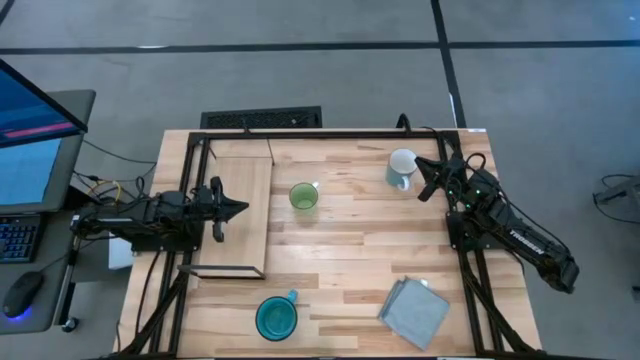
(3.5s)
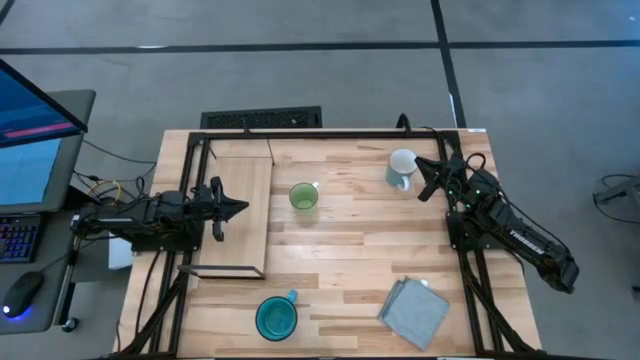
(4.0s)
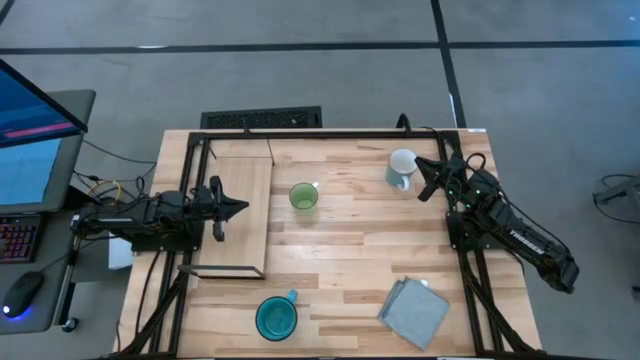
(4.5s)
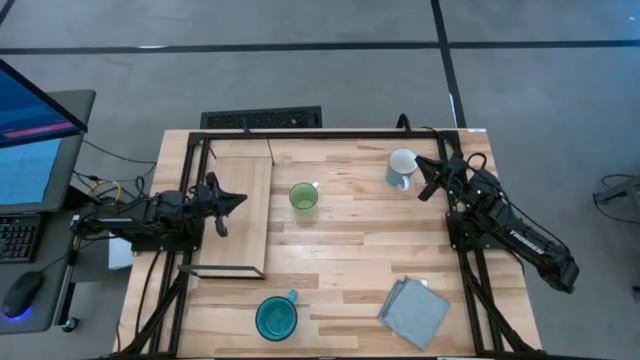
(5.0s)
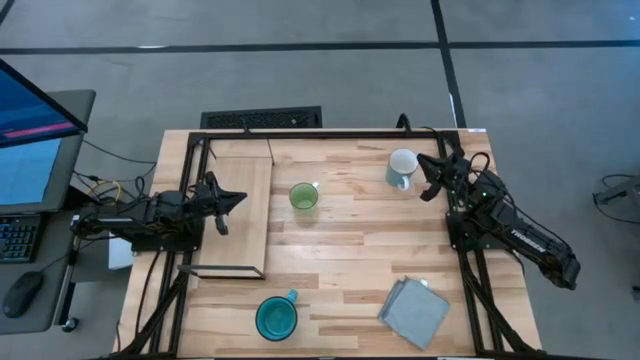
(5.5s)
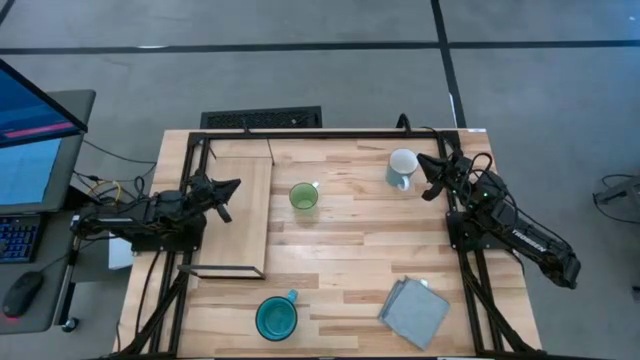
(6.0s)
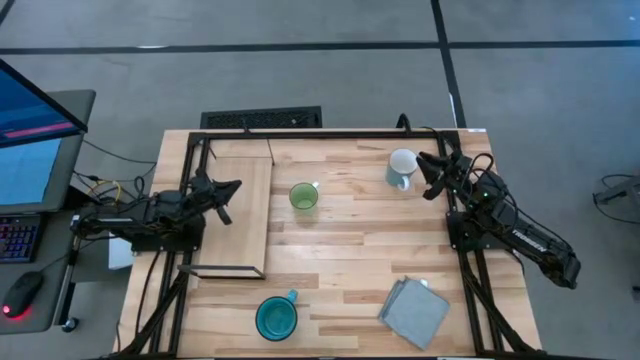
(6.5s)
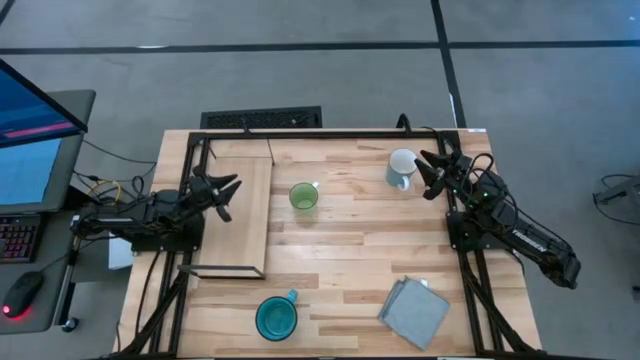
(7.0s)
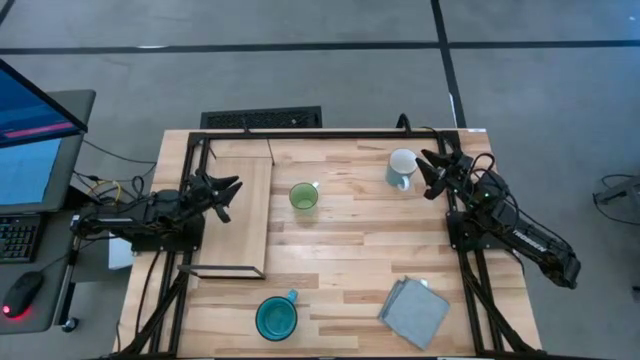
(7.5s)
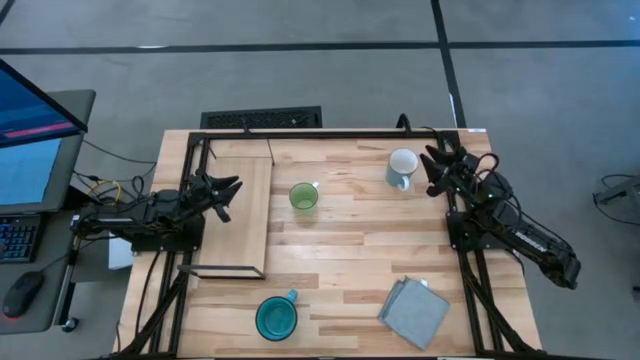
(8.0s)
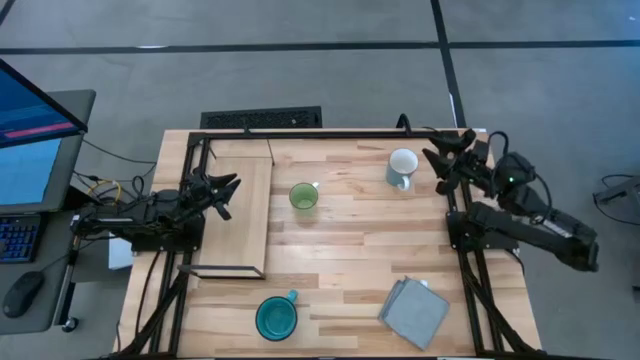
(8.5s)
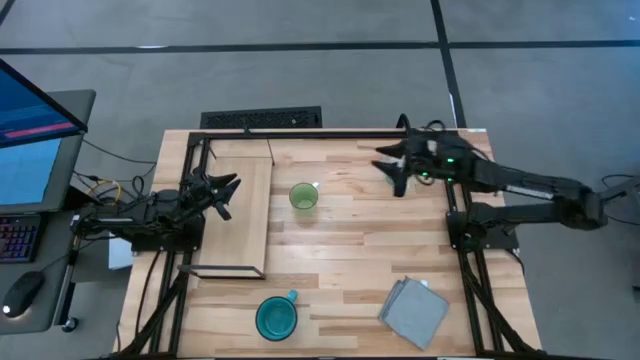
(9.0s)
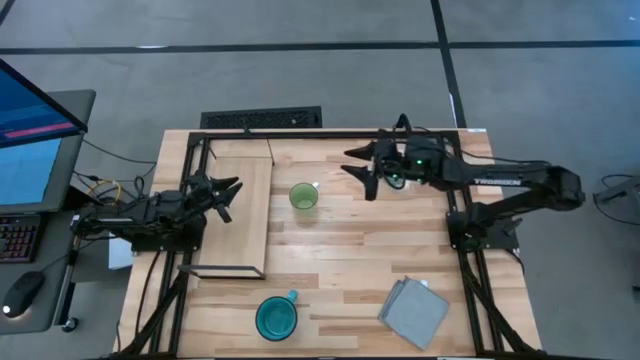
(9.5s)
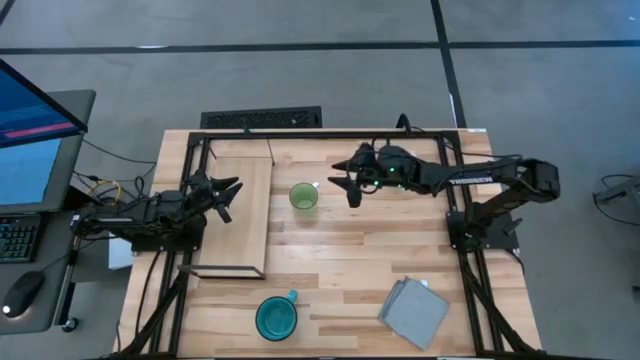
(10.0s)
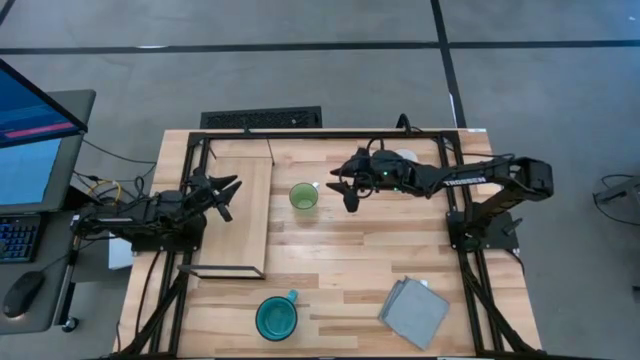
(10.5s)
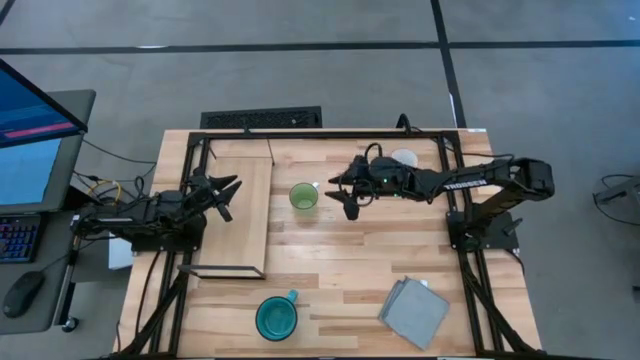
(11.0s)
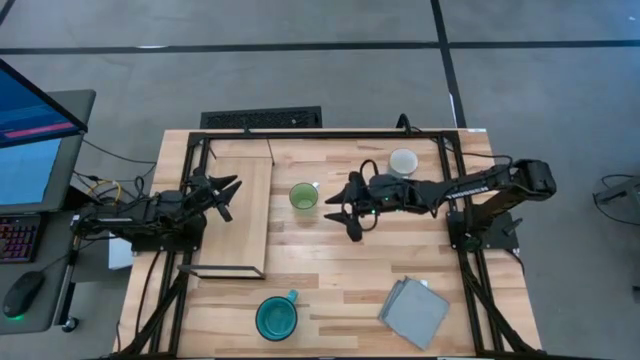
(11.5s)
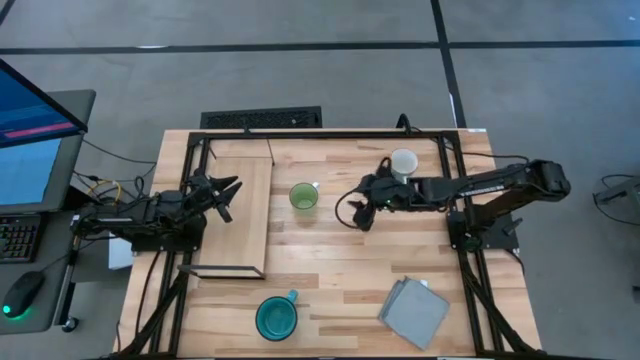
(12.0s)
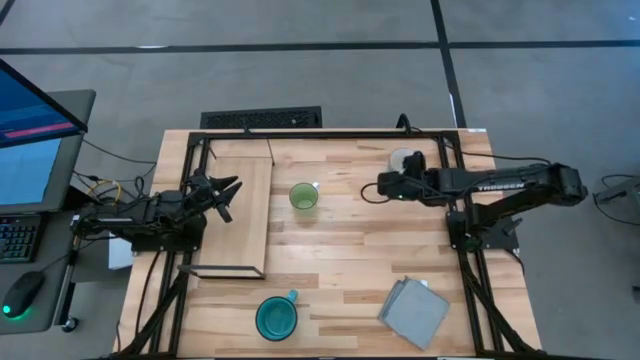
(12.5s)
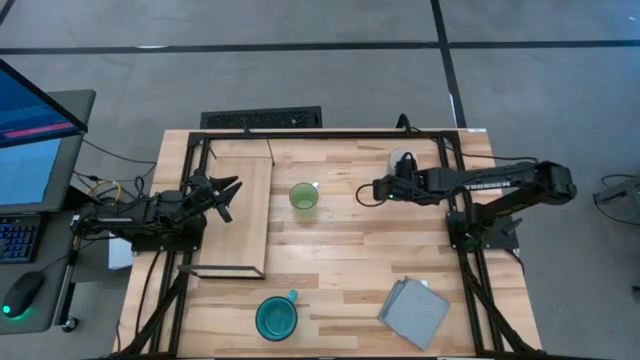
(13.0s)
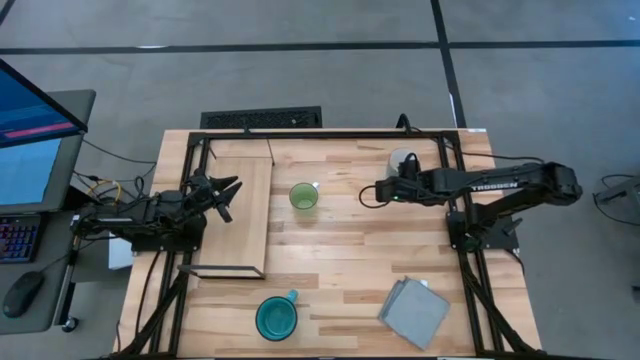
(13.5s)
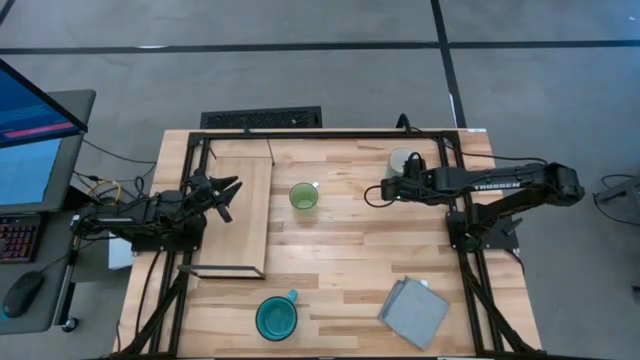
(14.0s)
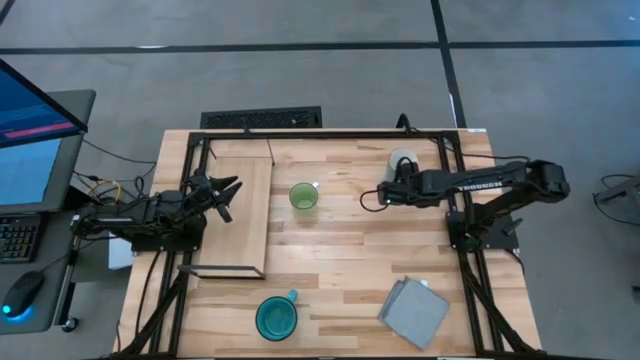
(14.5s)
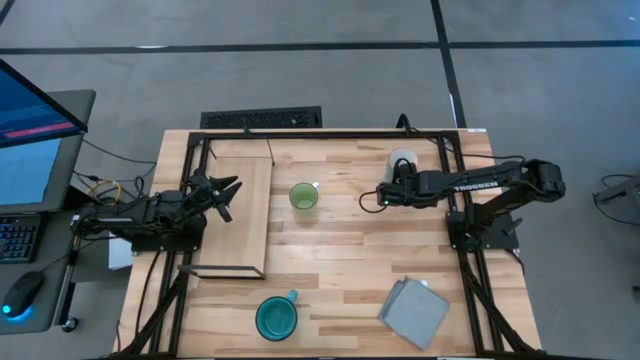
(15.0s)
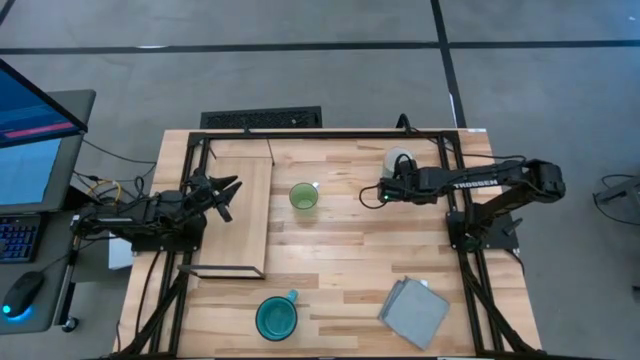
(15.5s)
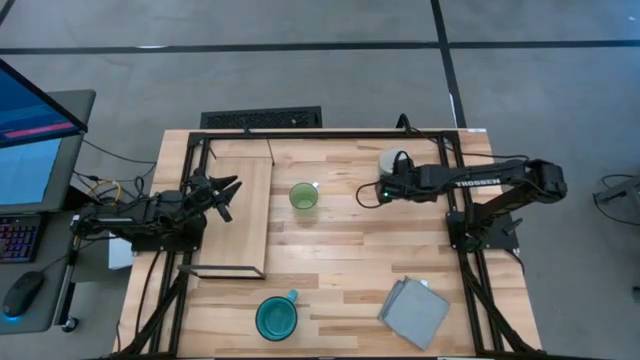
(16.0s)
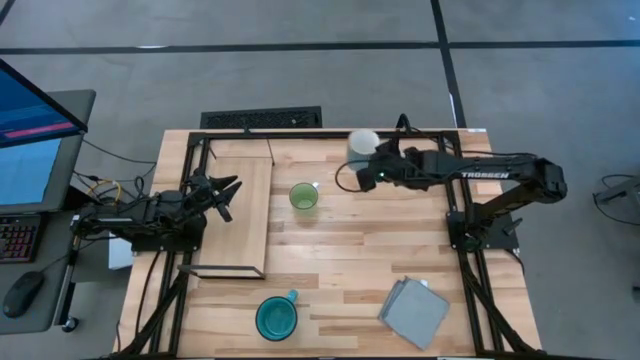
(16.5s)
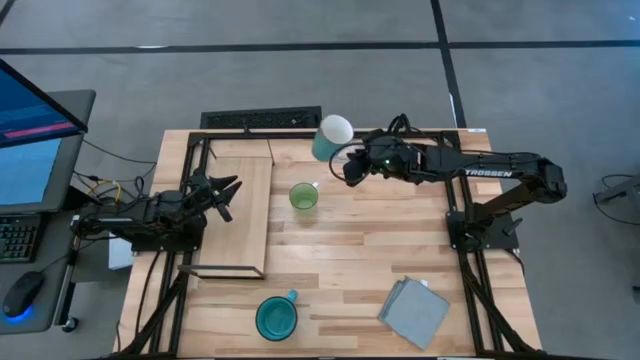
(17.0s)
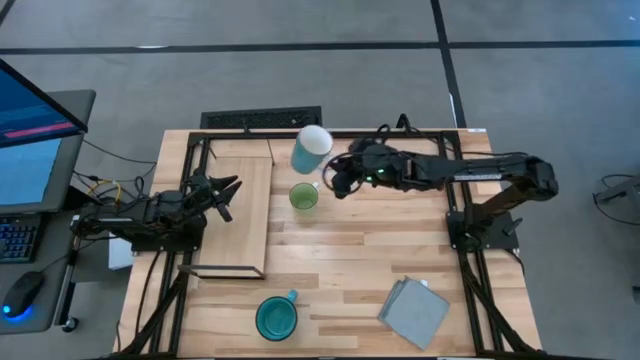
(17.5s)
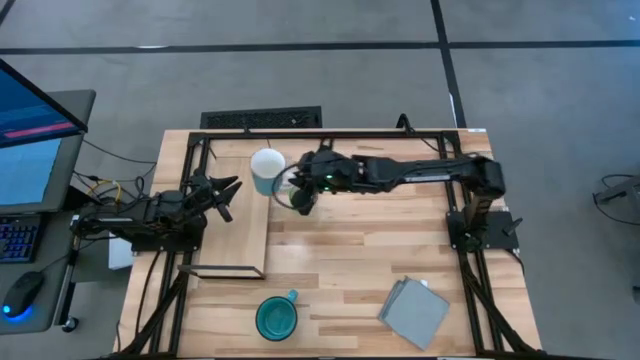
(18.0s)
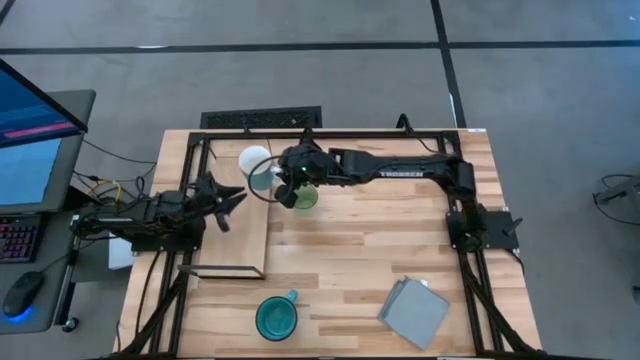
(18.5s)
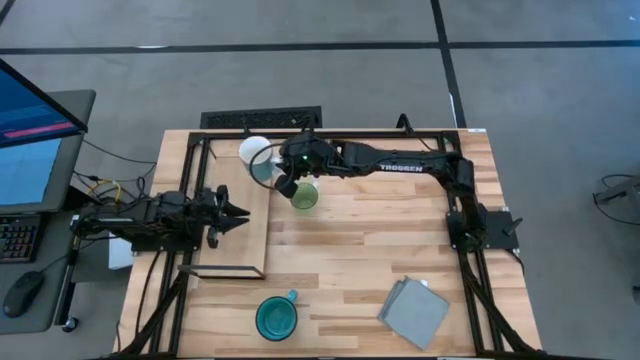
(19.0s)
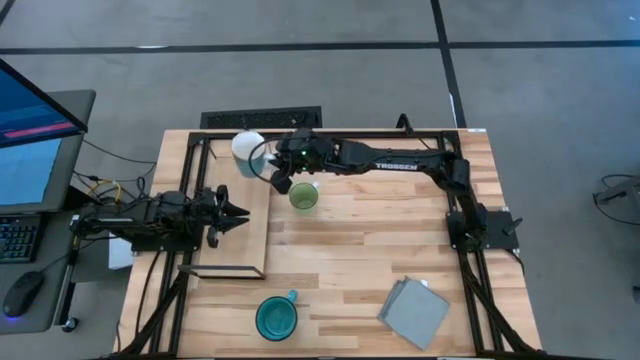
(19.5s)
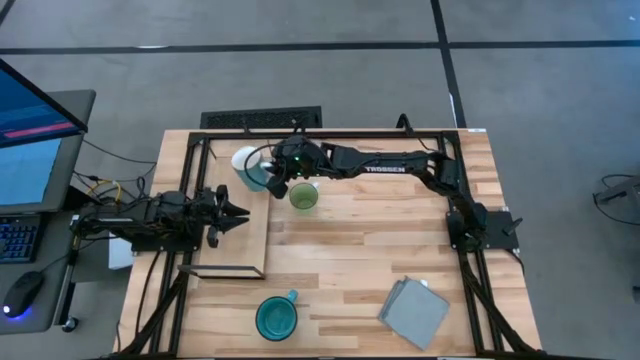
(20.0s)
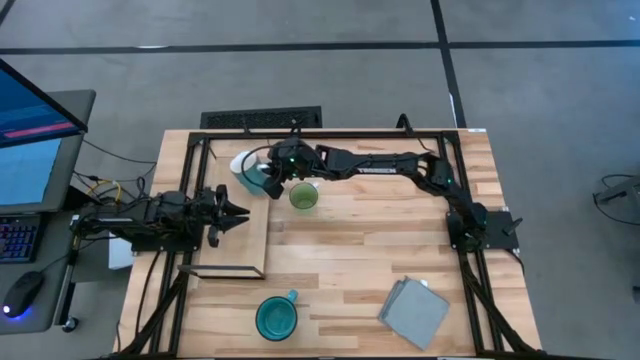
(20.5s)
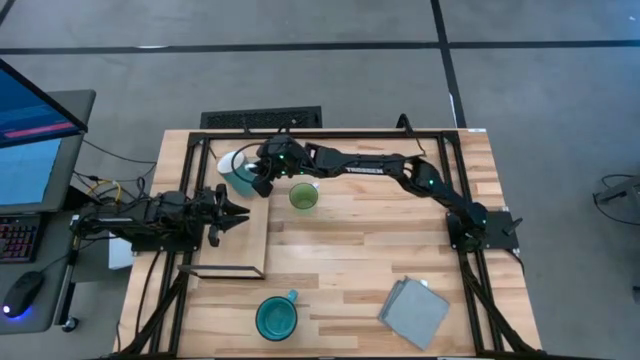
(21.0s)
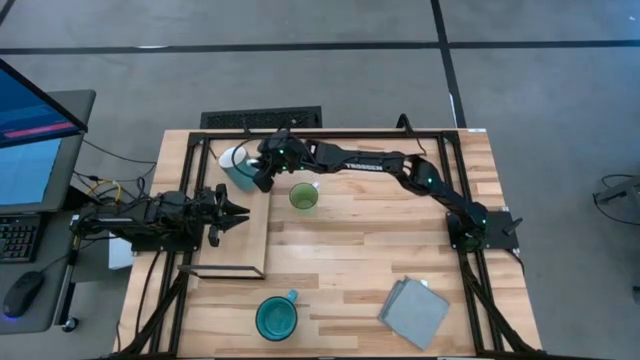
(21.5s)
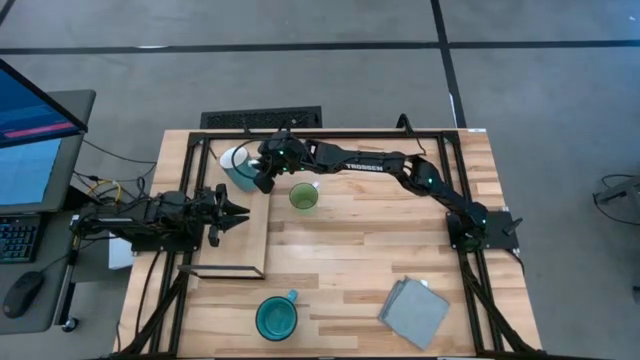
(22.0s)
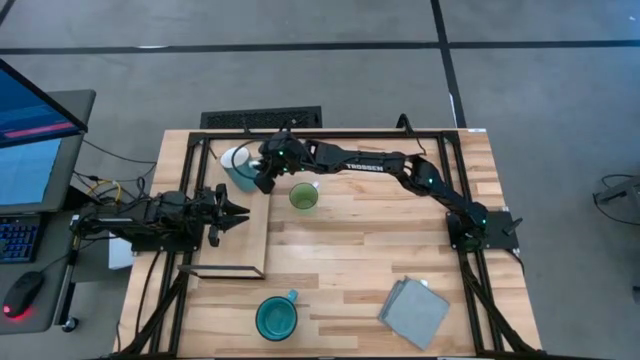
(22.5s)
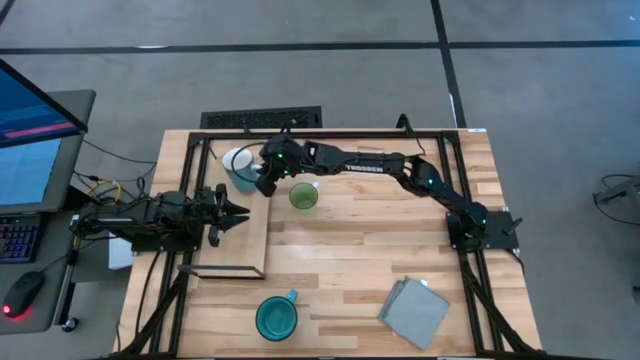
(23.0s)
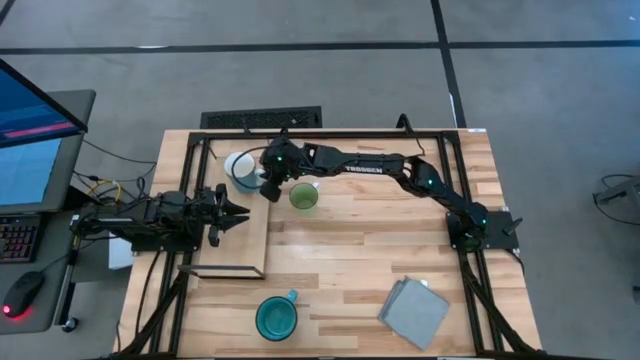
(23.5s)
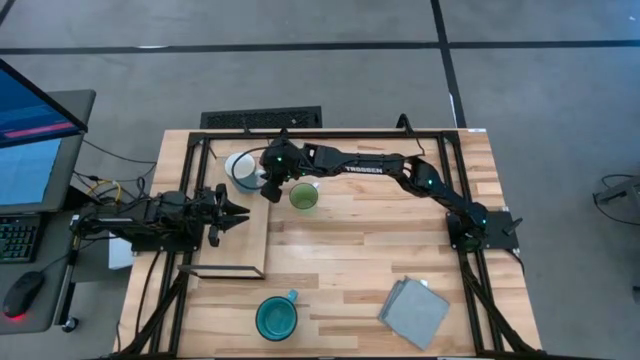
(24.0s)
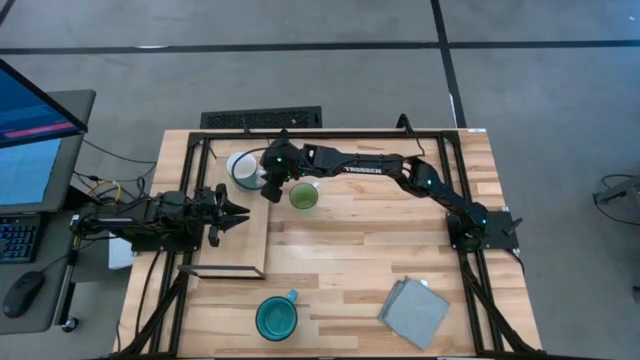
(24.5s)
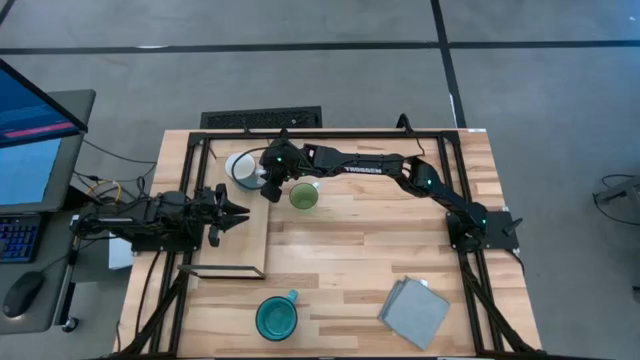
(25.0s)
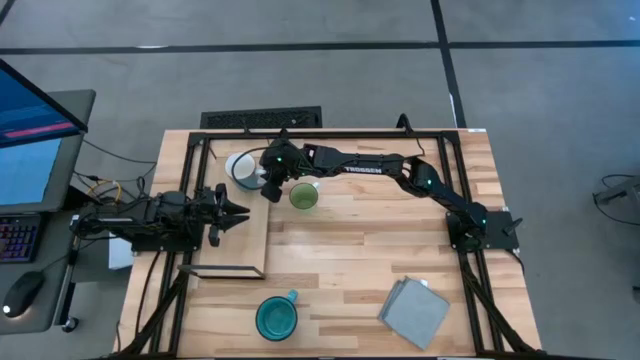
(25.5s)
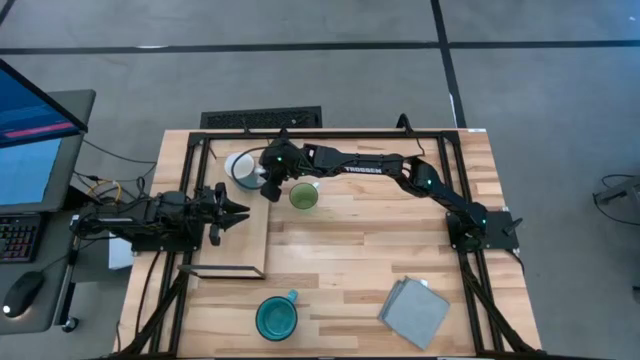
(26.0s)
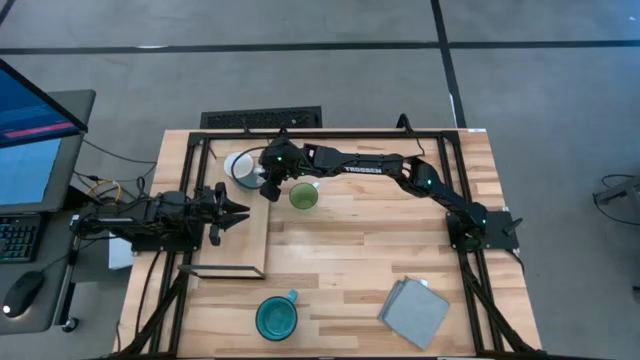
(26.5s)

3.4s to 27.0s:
Task: Stack small to large cups/mugs on shelf
Put the light blue mug on the shelf
